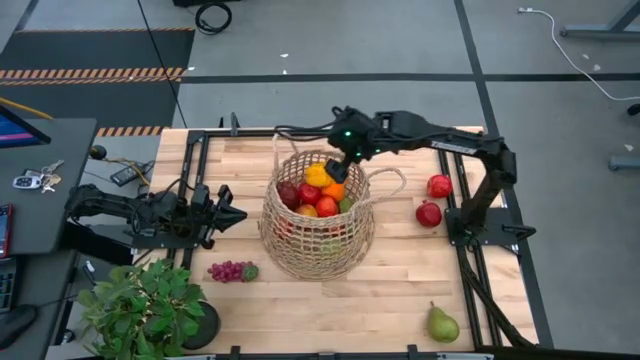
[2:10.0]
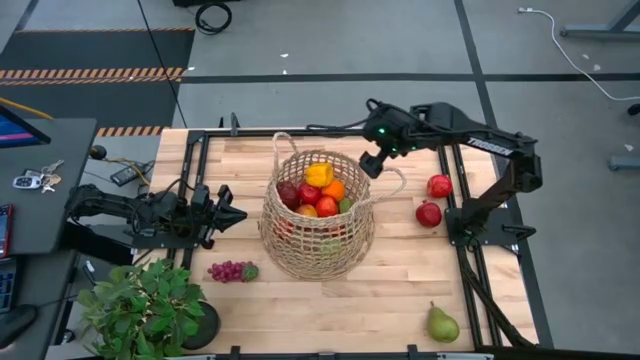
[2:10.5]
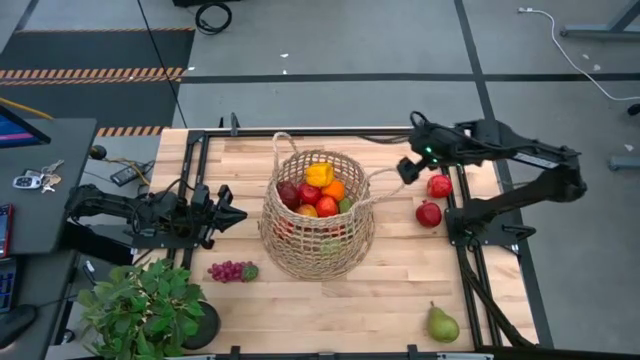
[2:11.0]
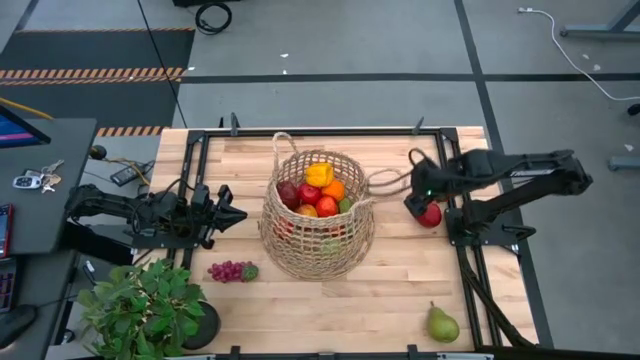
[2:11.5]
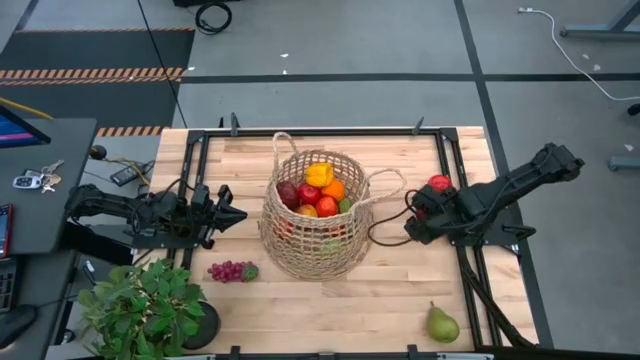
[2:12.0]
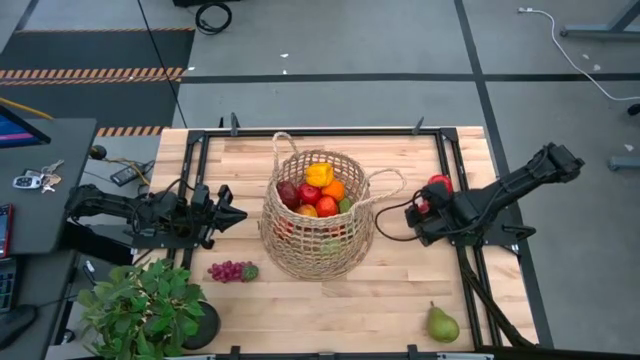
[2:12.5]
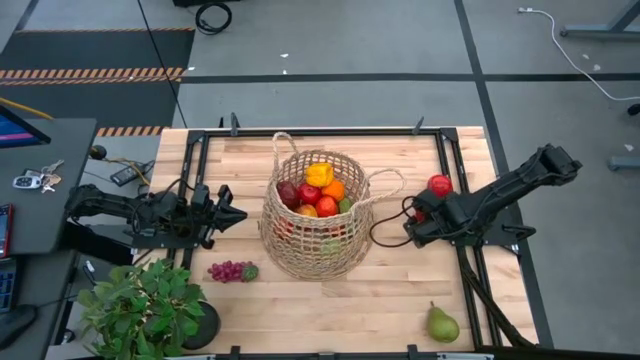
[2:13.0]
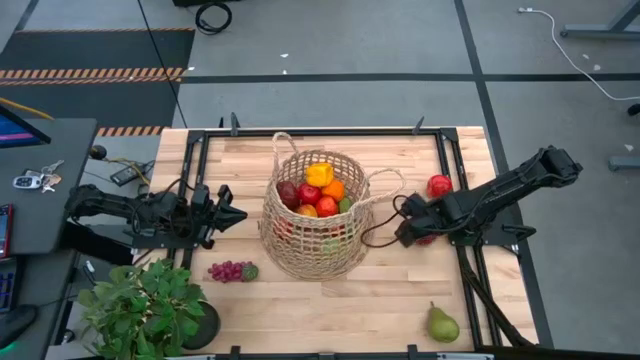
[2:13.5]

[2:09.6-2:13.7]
Task: Build produce basket
Put the red pomegranate into the brown basket

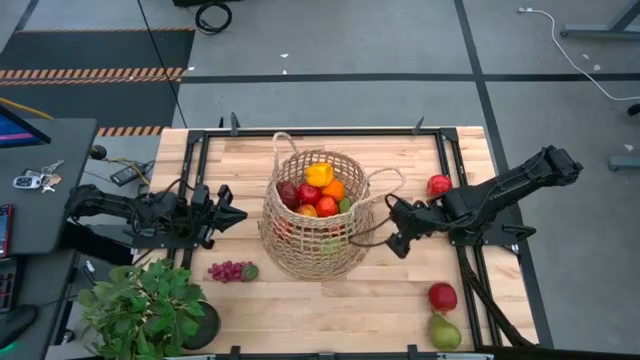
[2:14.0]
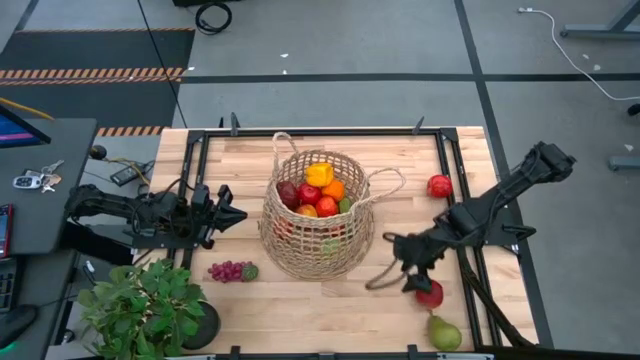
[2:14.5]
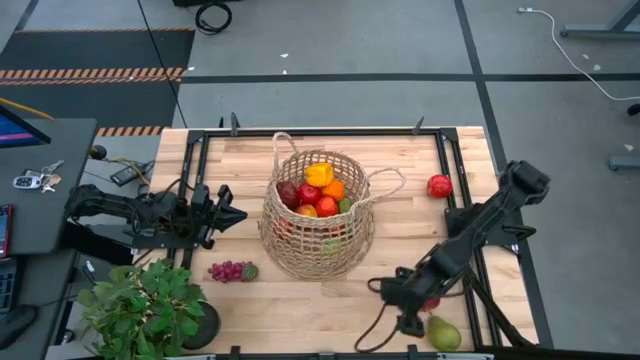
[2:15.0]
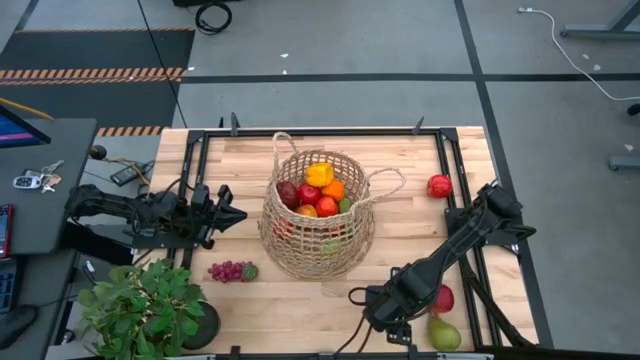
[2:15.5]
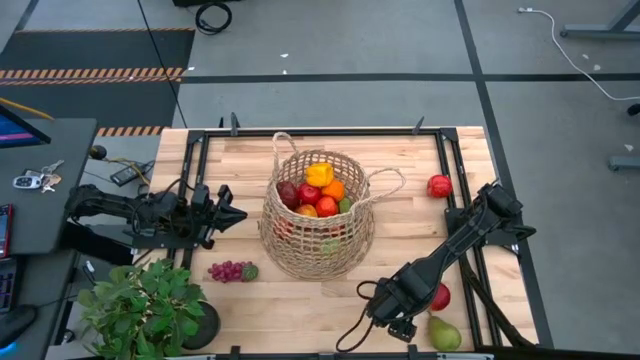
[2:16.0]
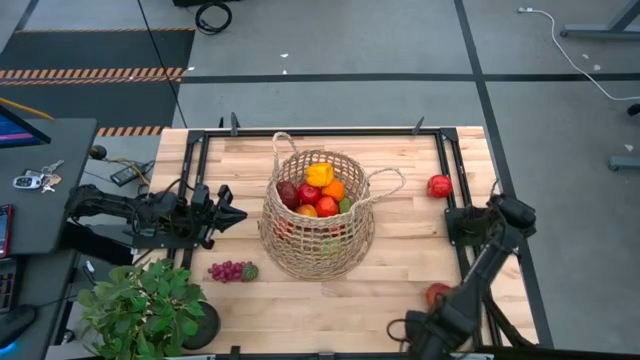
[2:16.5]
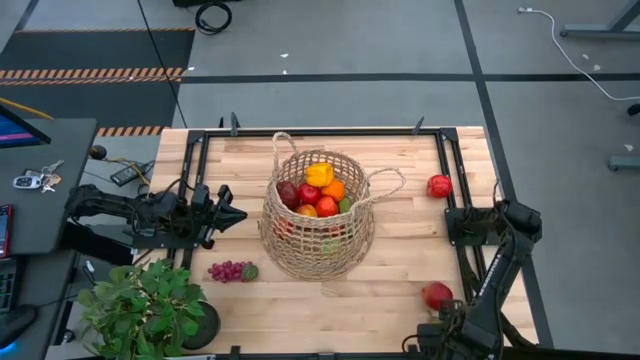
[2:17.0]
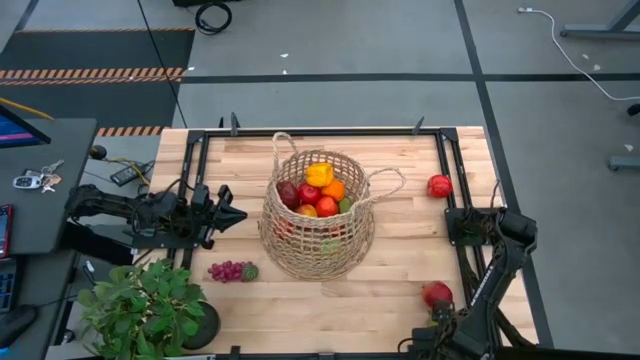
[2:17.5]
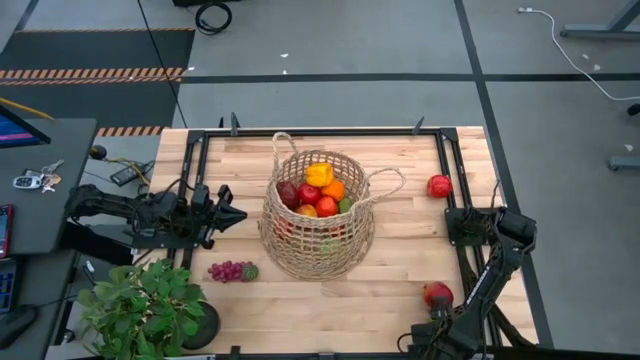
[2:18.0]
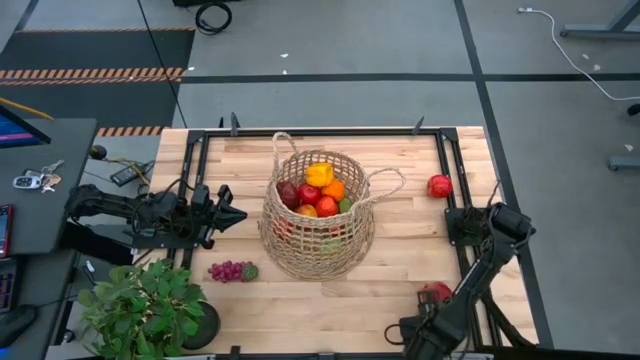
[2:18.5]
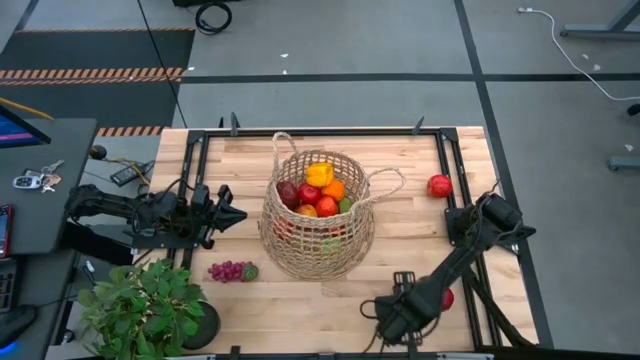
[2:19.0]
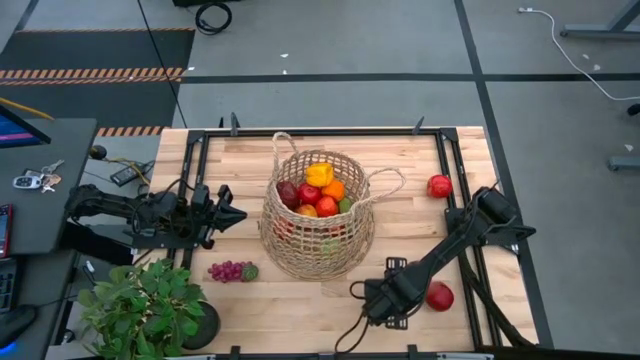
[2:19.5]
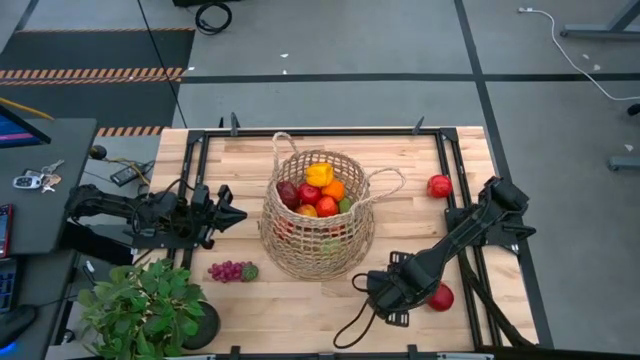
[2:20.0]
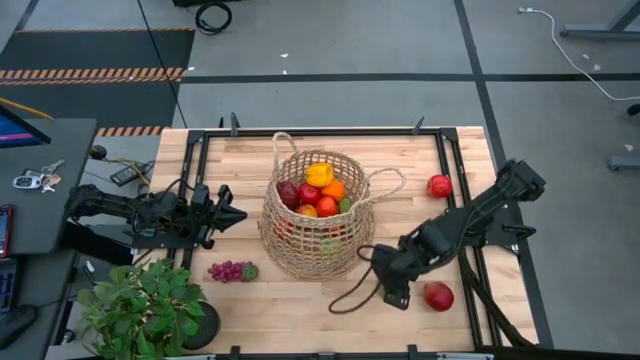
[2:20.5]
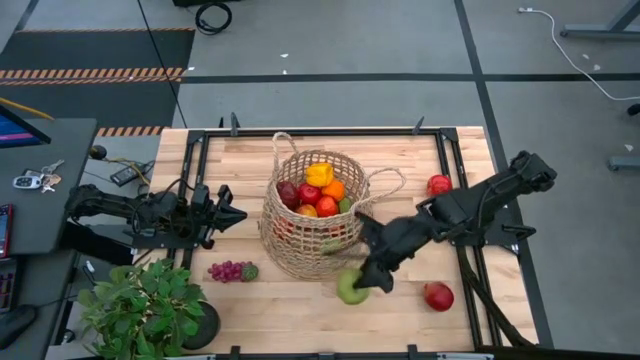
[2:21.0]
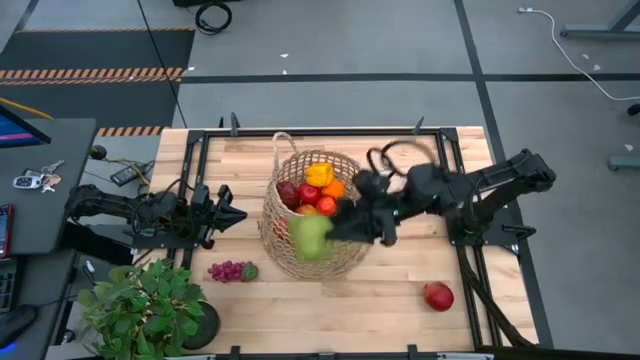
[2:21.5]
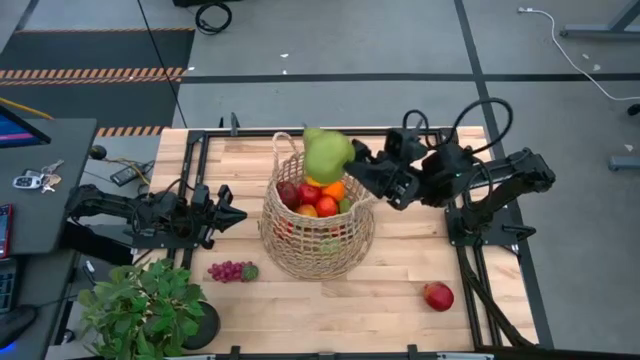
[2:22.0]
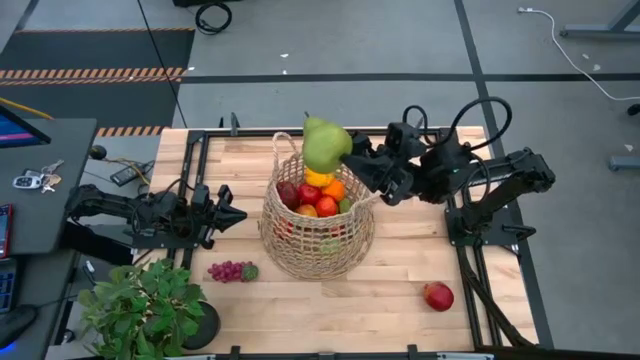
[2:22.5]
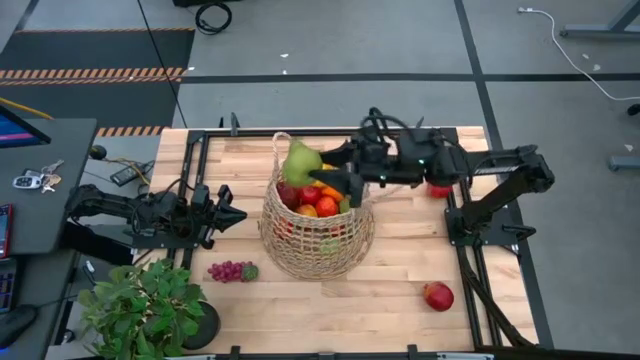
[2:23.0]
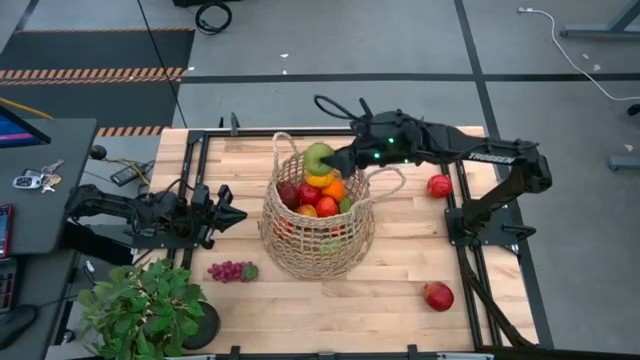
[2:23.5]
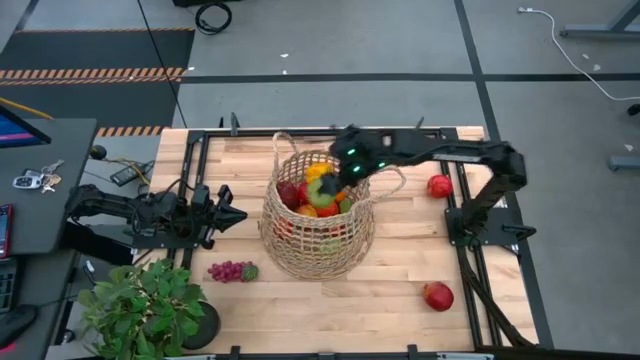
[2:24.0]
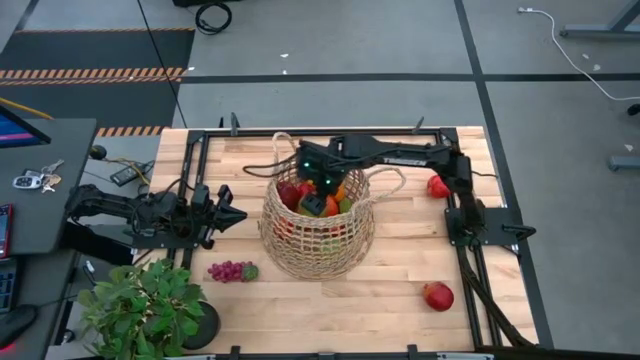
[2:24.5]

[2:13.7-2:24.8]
Put the green pear into the brown basket

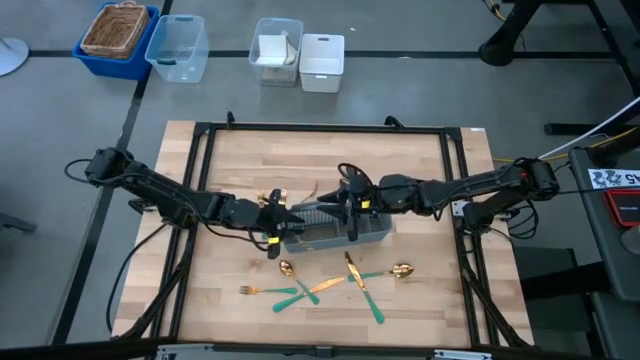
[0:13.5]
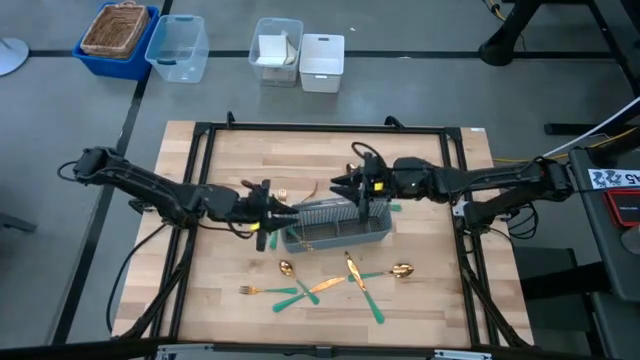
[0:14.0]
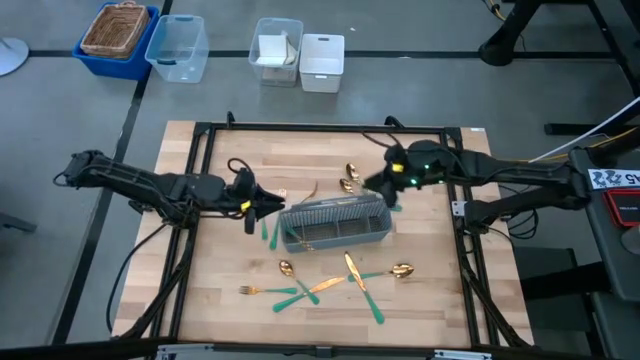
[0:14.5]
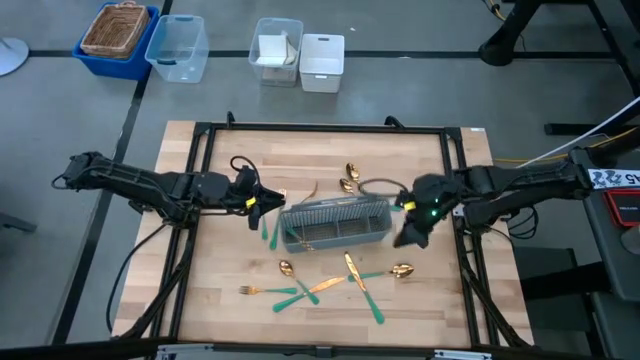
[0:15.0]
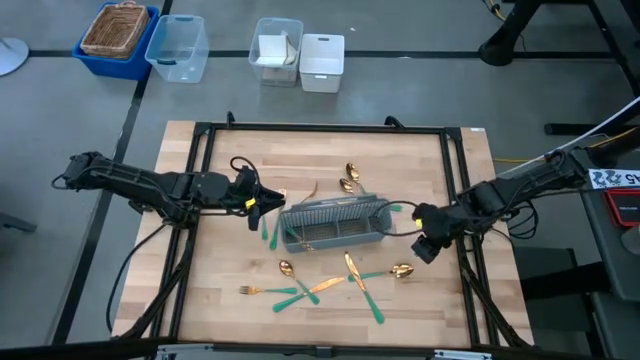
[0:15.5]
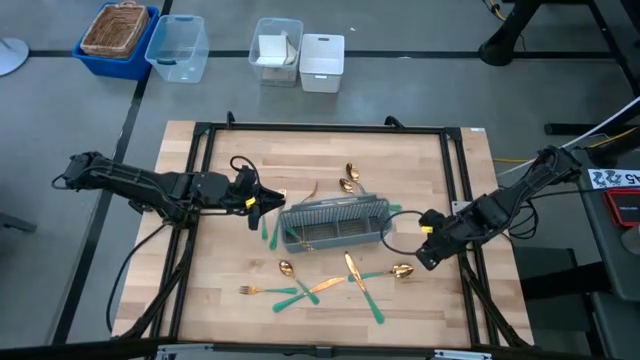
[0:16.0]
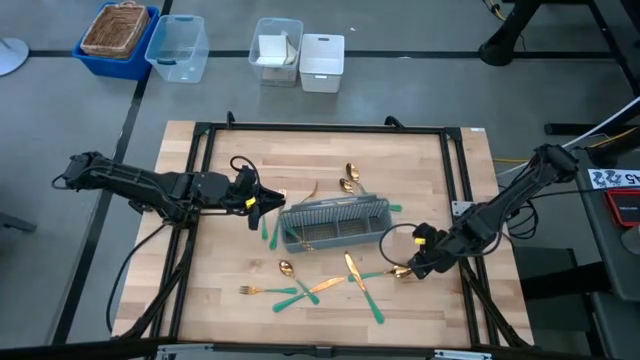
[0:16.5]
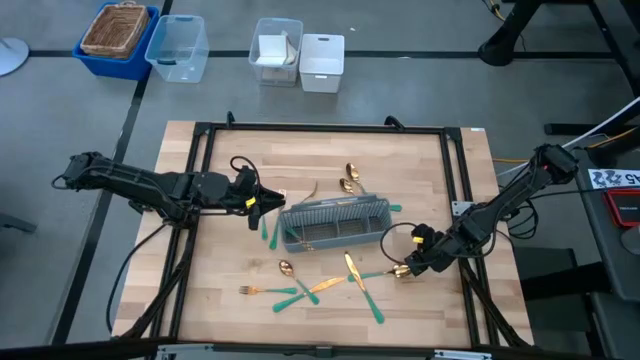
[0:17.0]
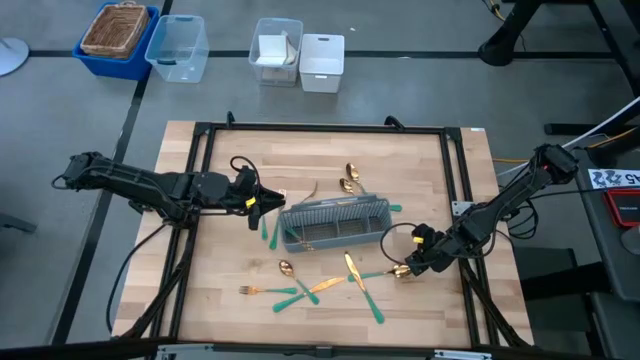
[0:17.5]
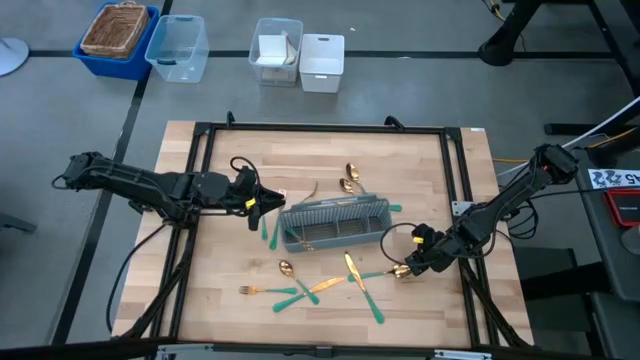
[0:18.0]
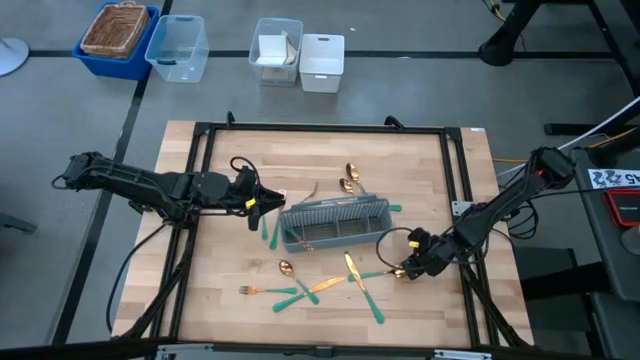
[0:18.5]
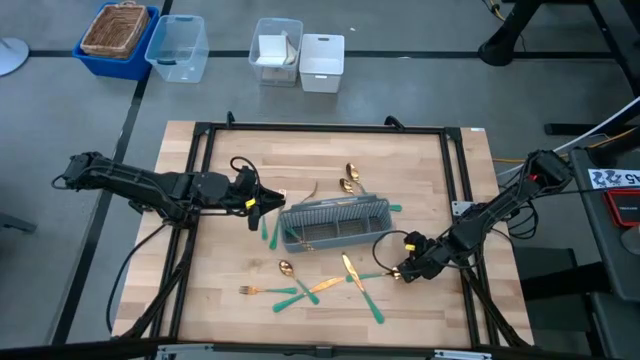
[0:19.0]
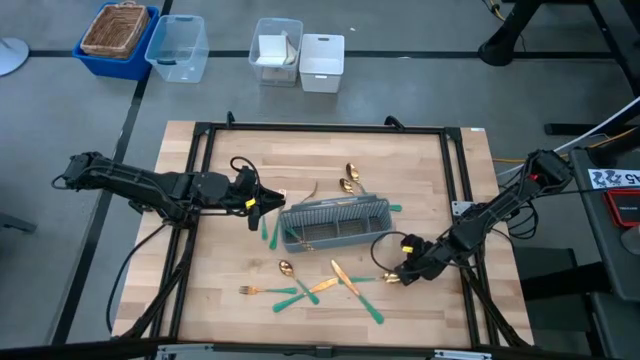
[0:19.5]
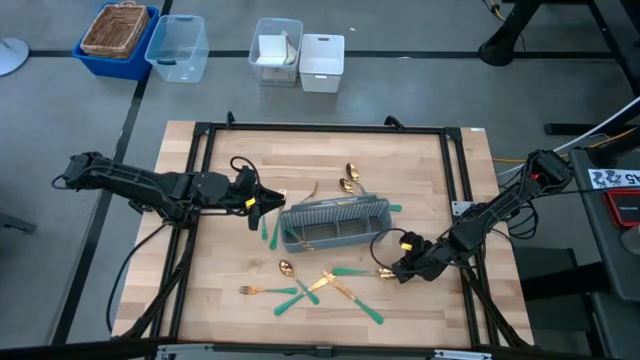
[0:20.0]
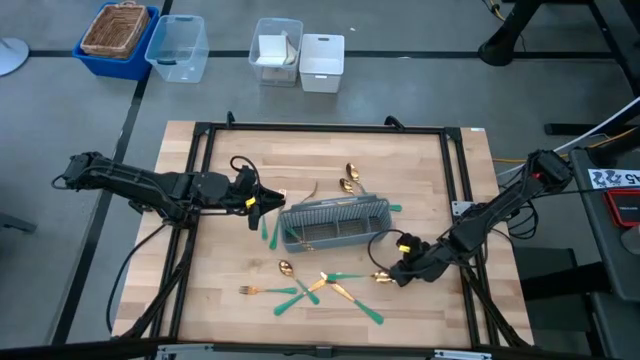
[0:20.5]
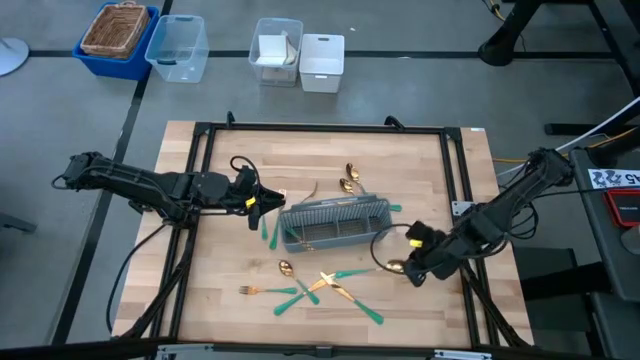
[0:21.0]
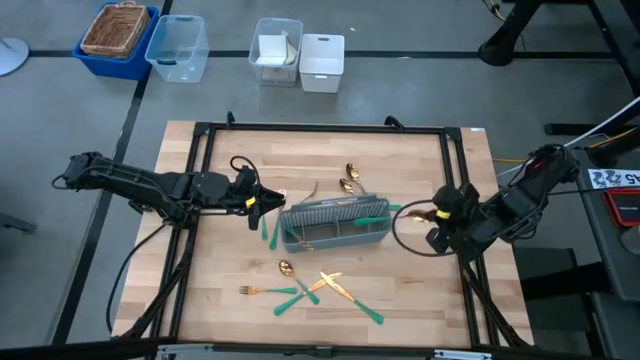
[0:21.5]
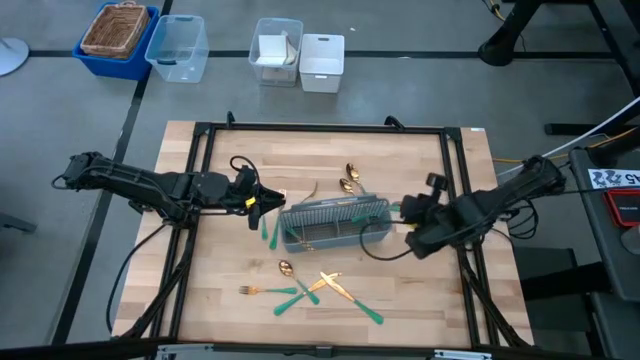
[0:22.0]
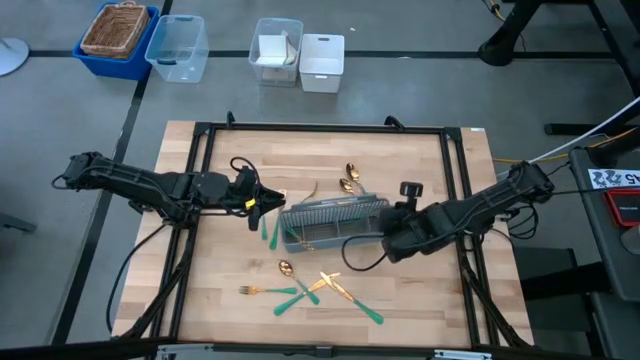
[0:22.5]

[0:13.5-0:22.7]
Task: Sort silverware
Put the green spoon into the gray utensil holder
